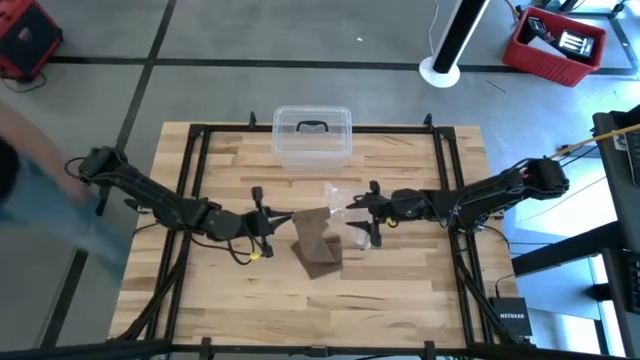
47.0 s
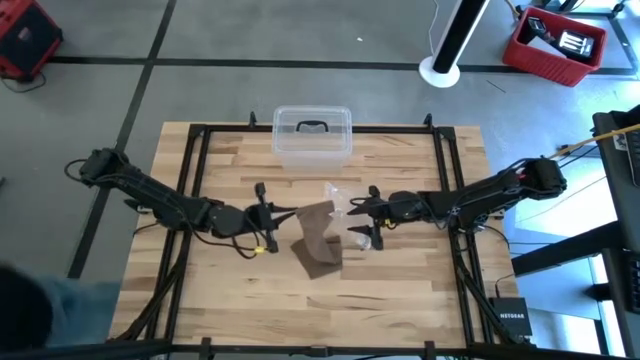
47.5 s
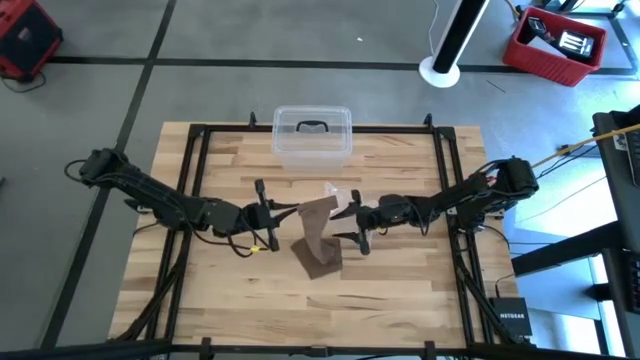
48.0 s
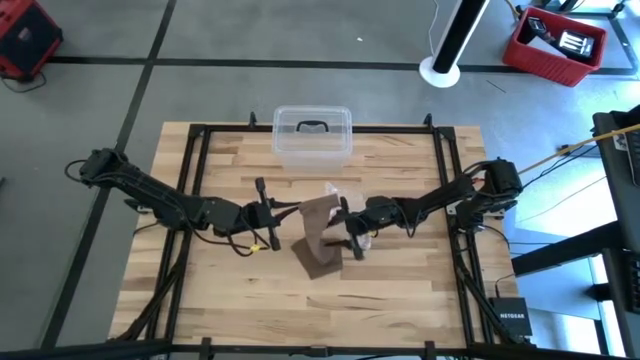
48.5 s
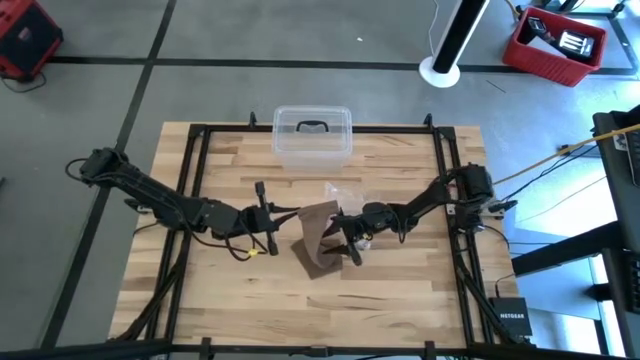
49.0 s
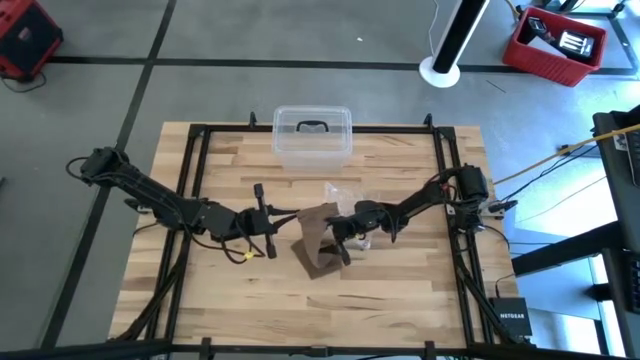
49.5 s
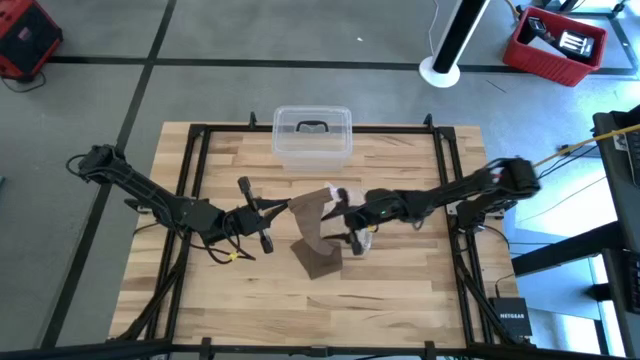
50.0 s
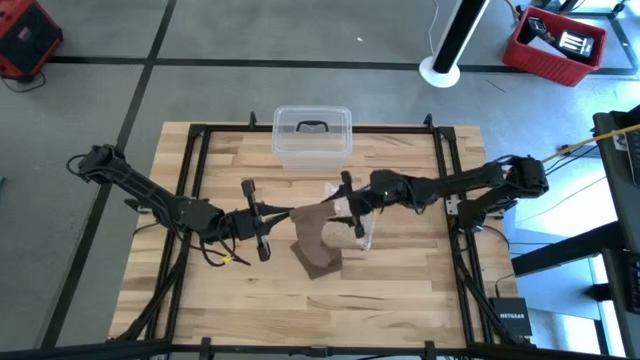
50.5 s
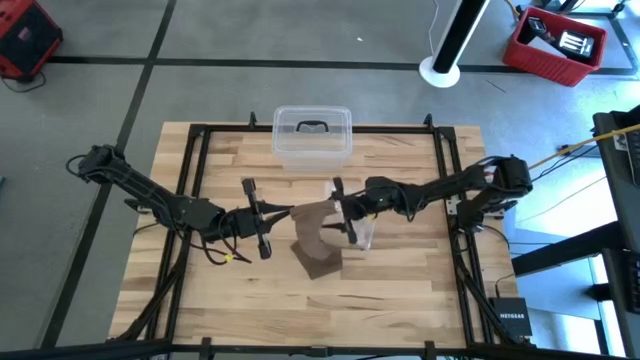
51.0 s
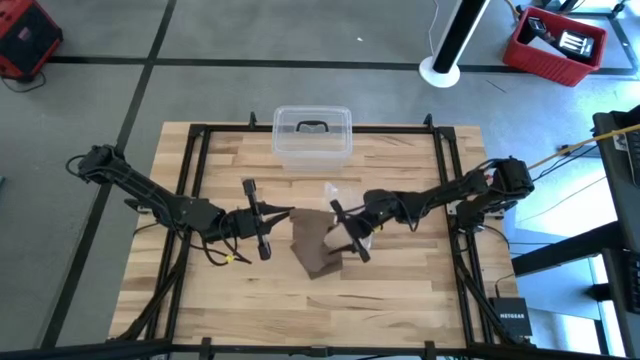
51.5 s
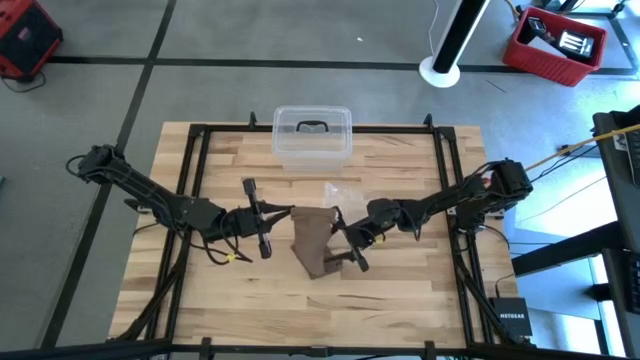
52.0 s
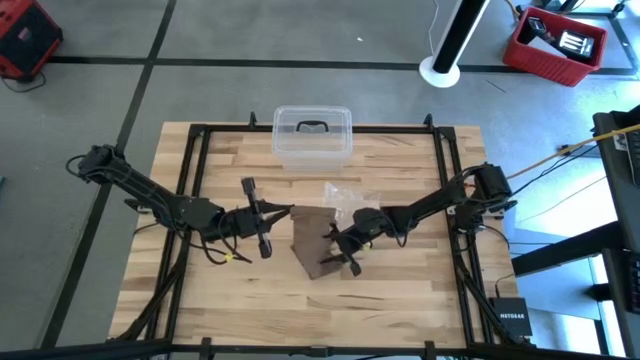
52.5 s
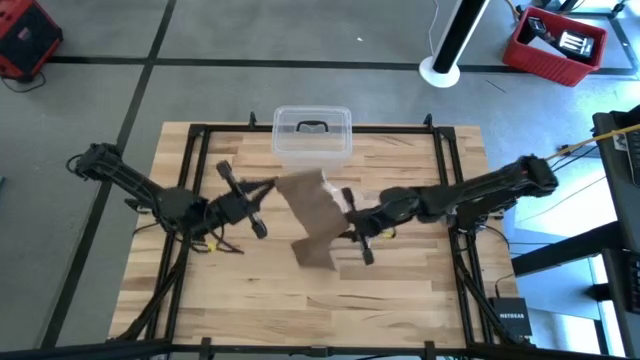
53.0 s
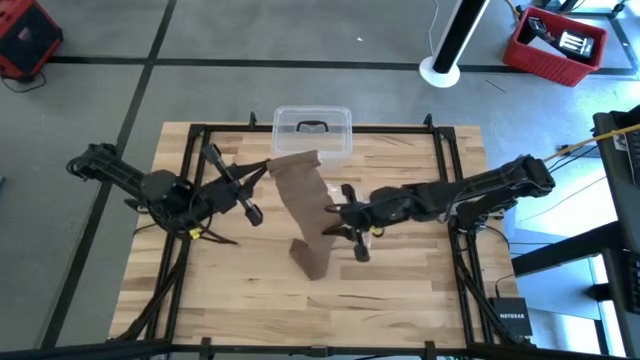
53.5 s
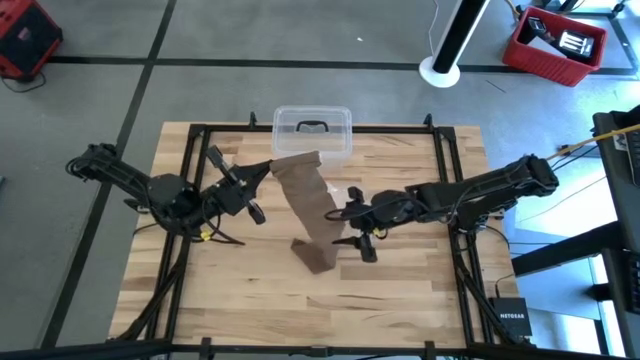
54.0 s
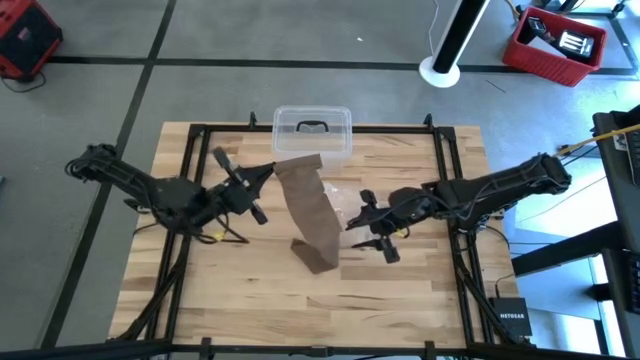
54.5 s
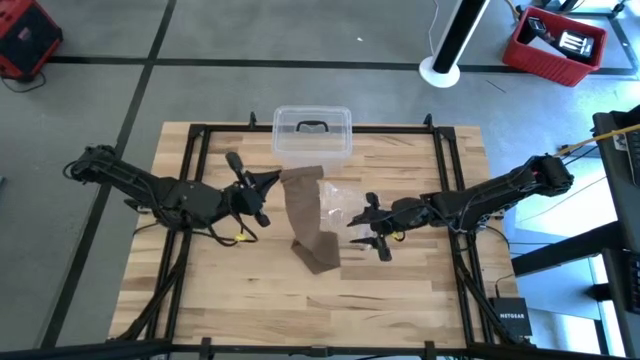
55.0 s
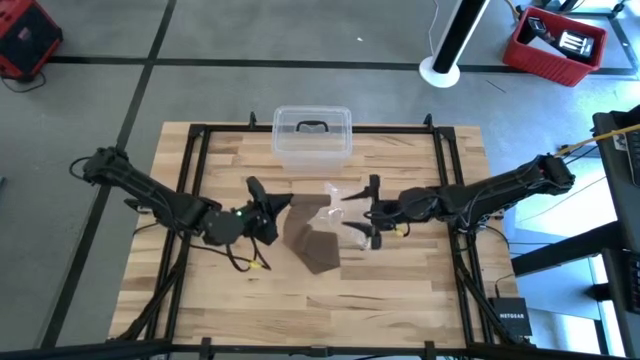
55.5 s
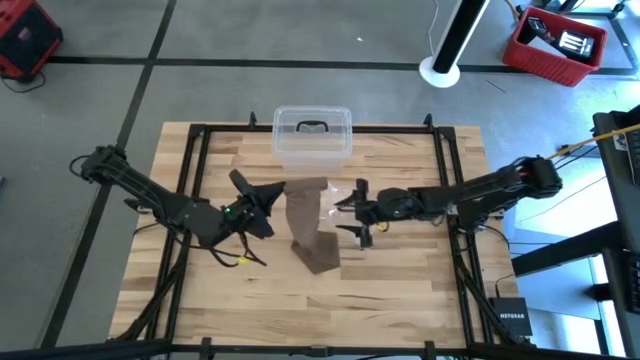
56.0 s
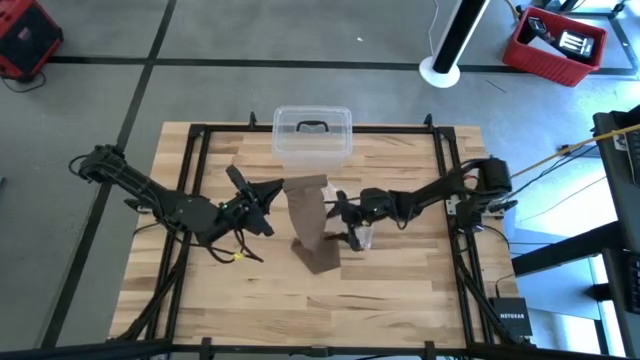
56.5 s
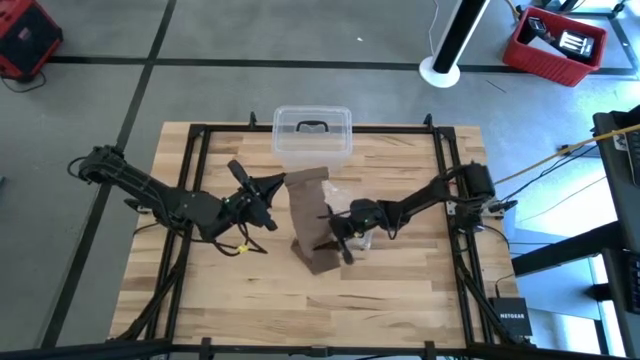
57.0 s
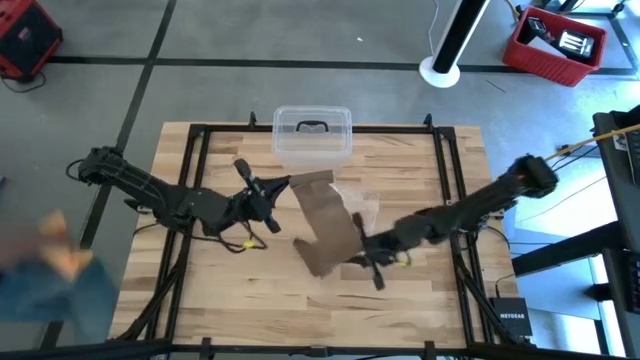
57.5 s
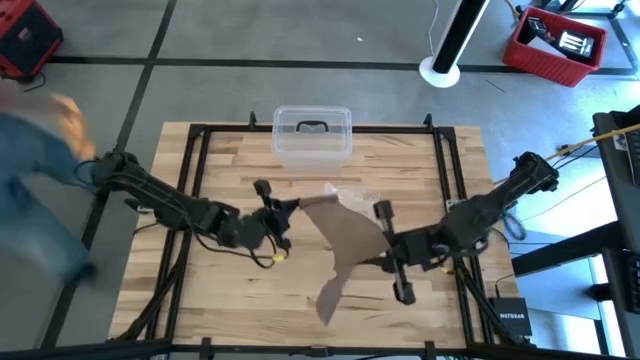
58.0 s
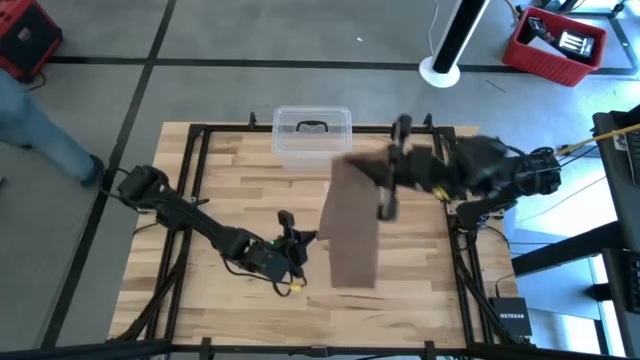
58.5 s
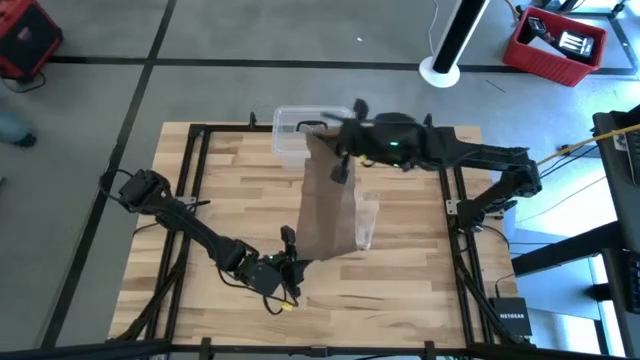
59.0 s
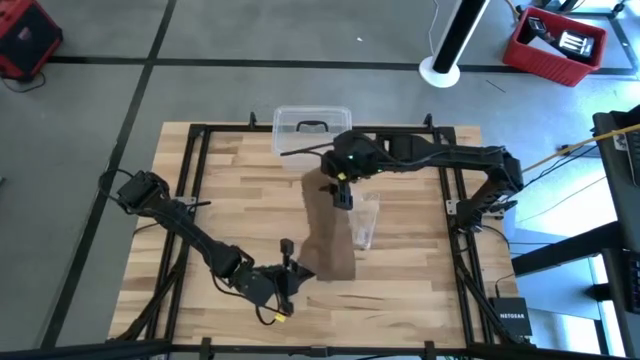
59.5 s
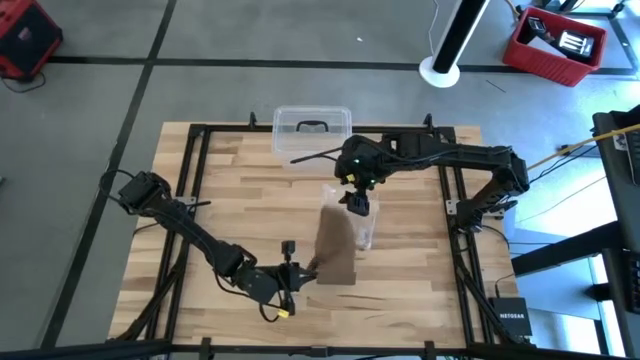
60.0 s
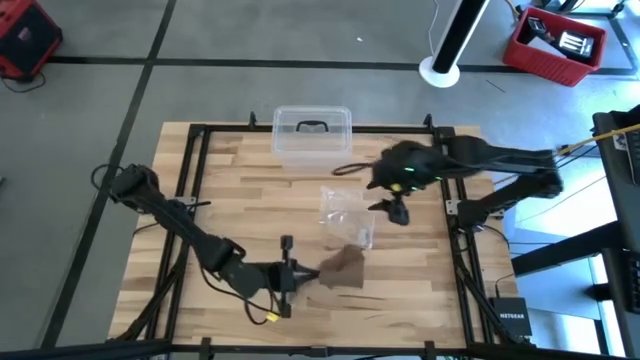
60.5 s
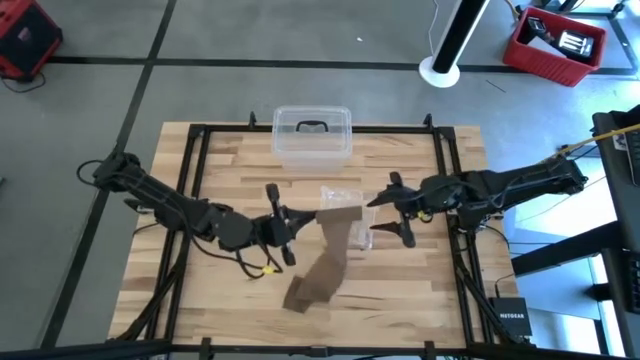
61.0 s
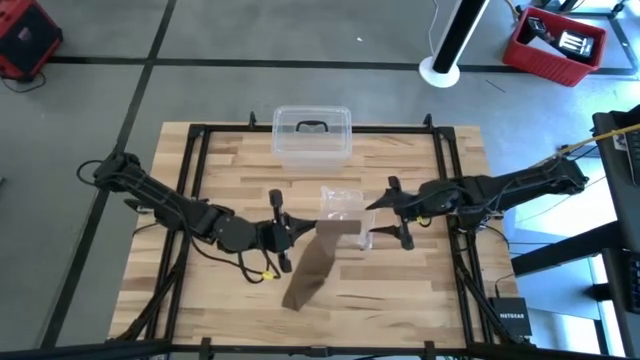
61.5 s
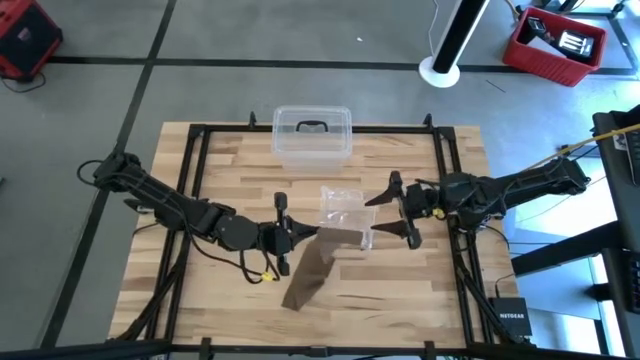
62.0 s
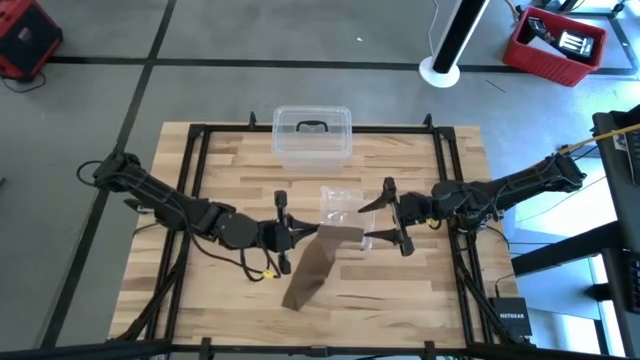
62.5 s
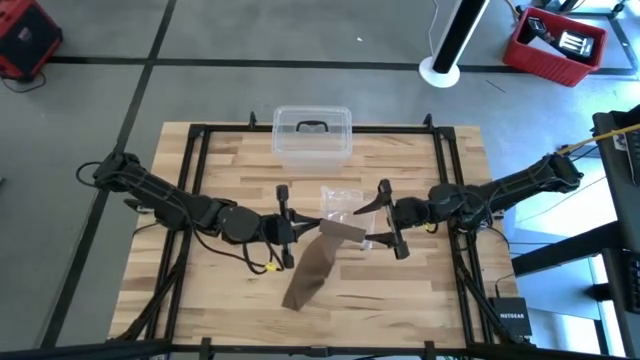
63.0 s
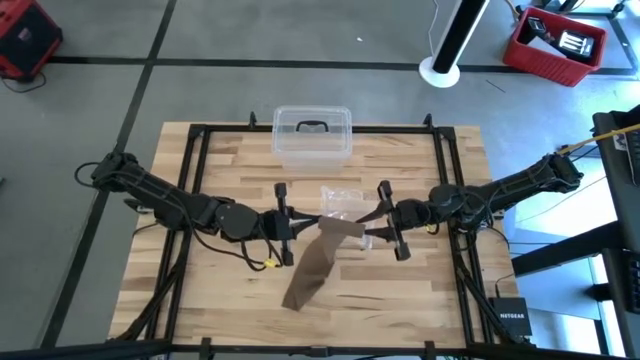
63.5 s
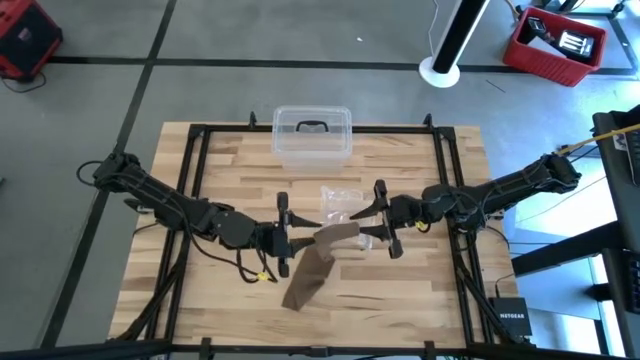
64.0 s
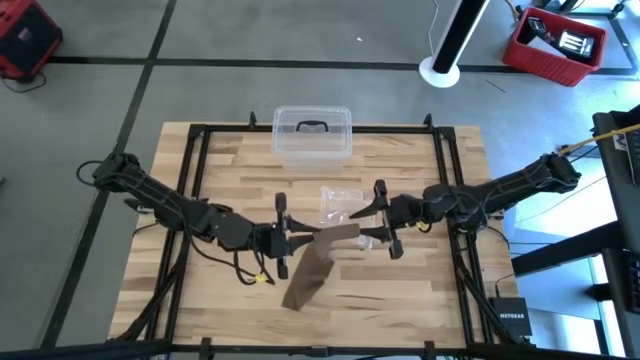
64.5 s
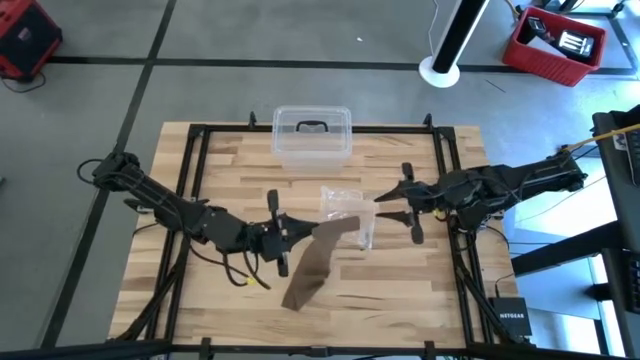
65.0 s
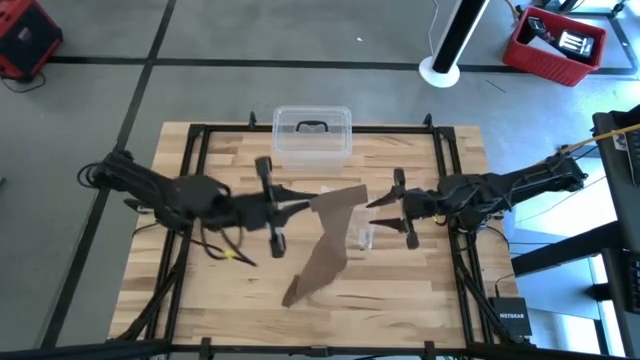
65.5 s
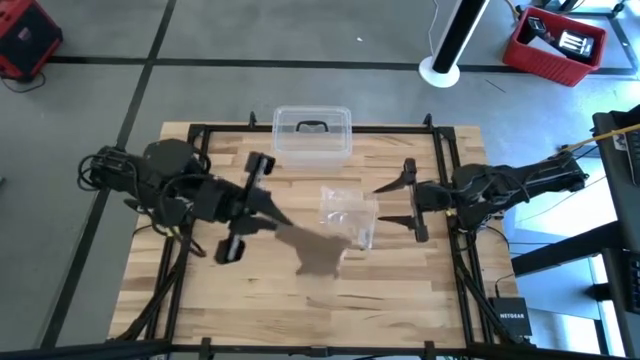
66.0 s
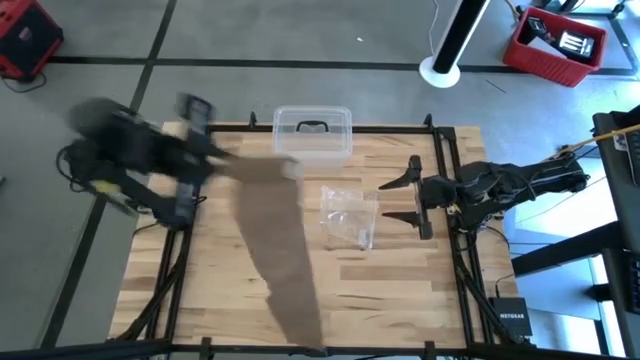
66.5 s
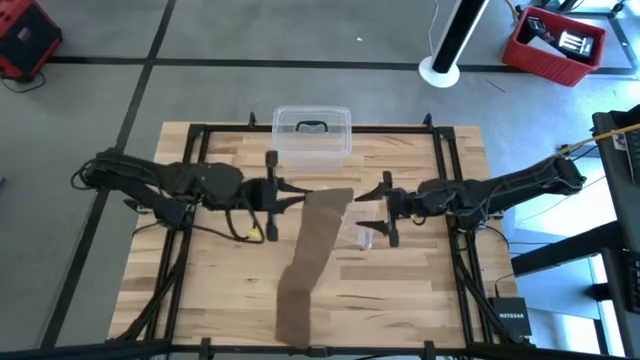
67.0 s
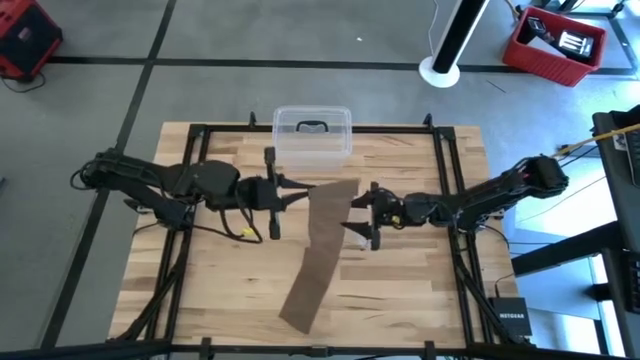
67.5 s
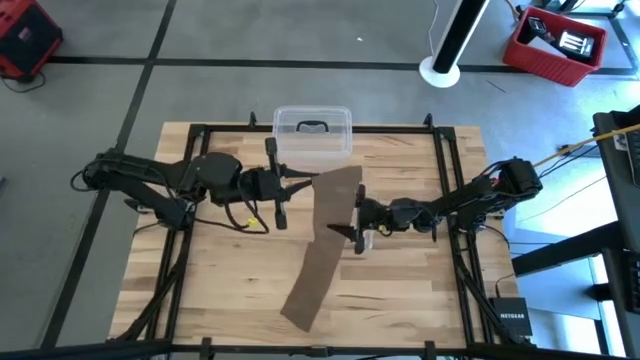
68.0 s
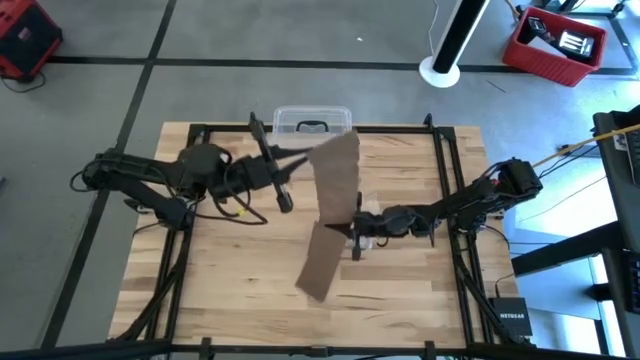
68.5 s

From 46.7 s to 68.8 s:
Task: Roll bandage
Roll the brown bandage
